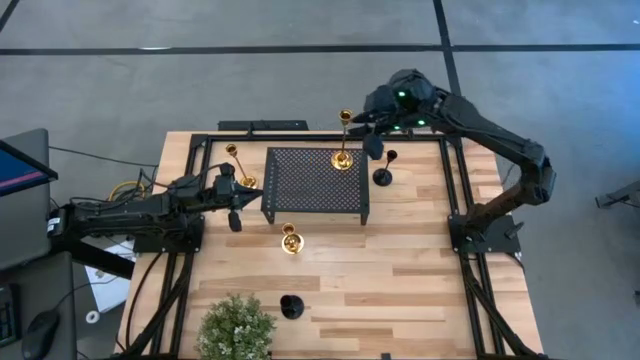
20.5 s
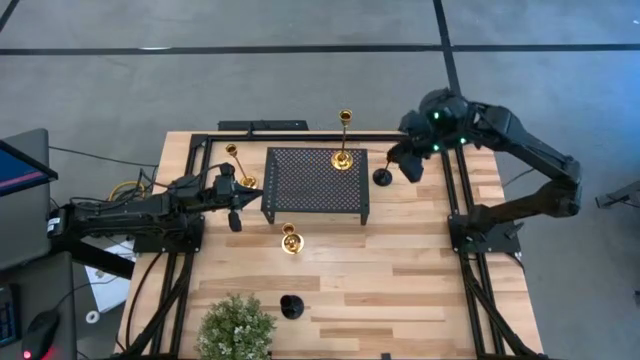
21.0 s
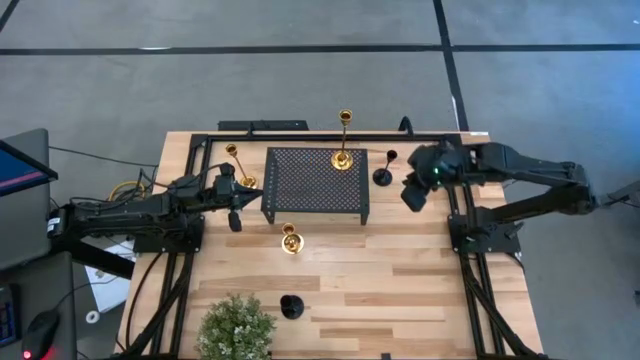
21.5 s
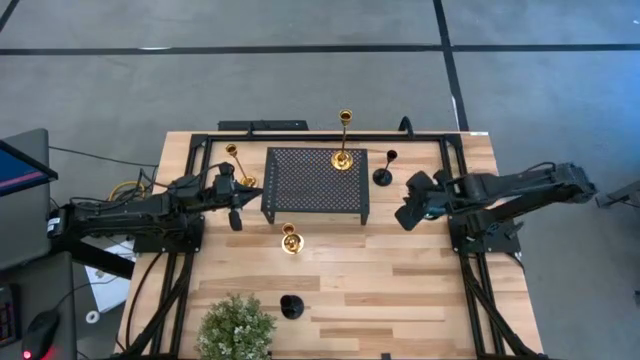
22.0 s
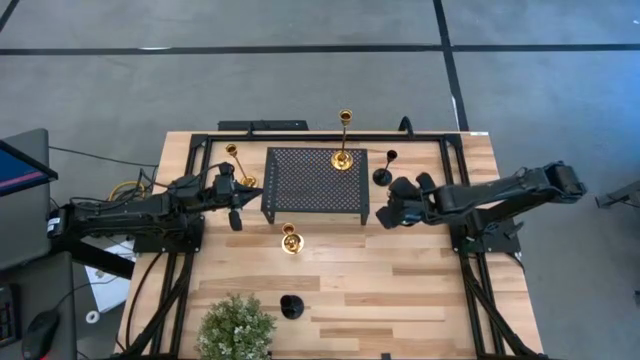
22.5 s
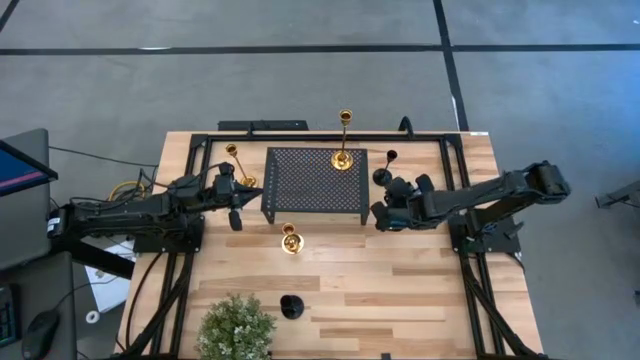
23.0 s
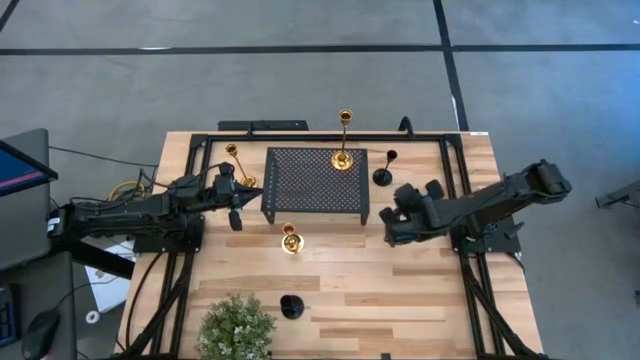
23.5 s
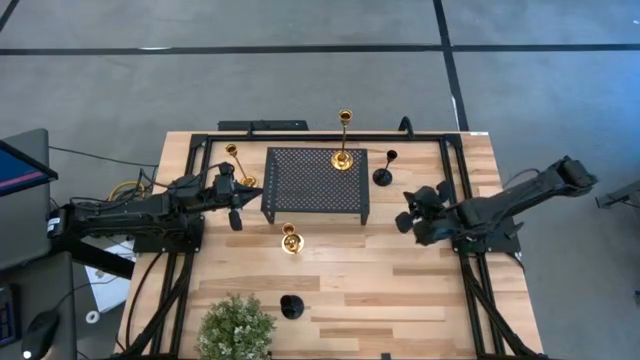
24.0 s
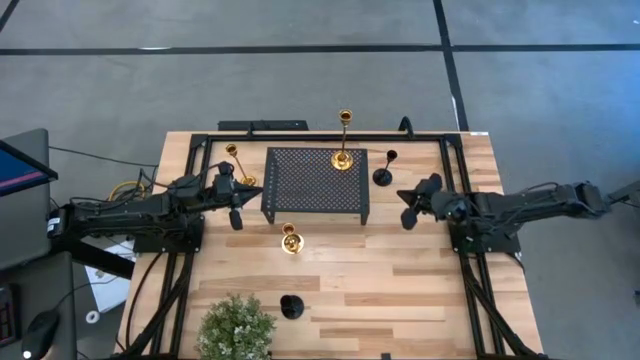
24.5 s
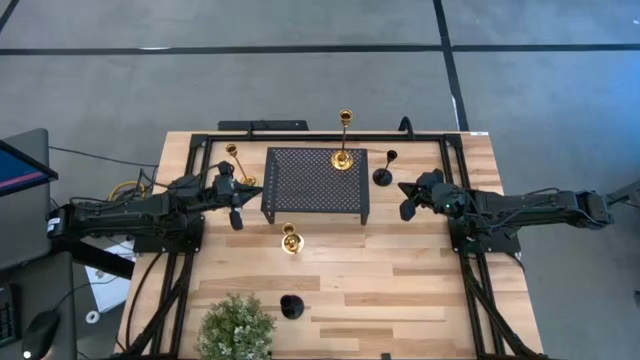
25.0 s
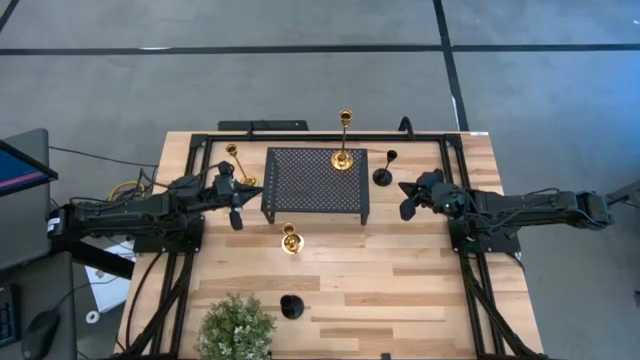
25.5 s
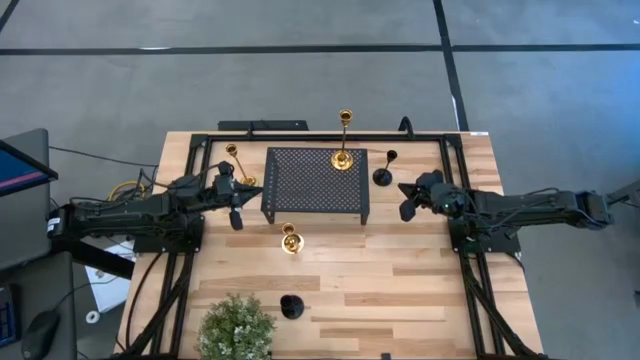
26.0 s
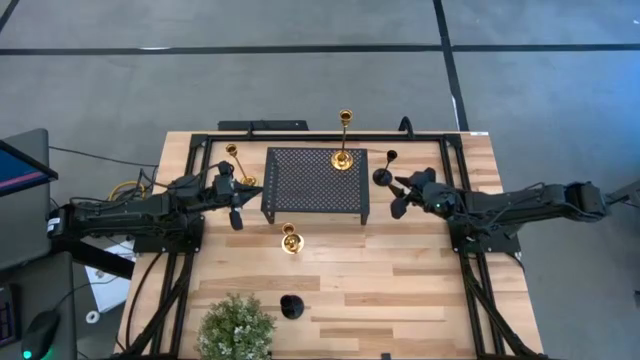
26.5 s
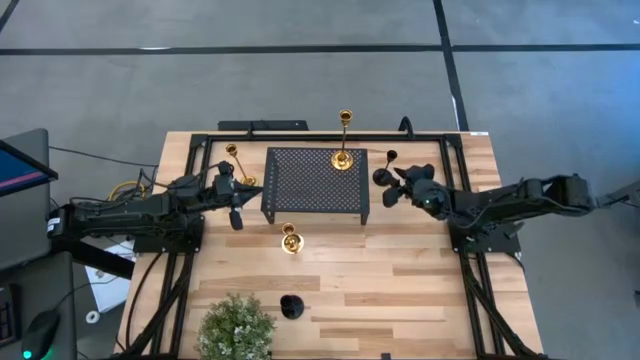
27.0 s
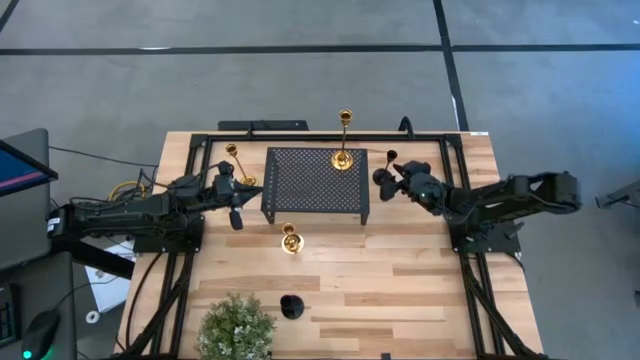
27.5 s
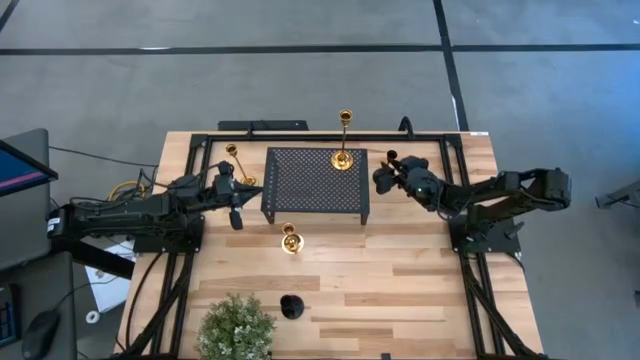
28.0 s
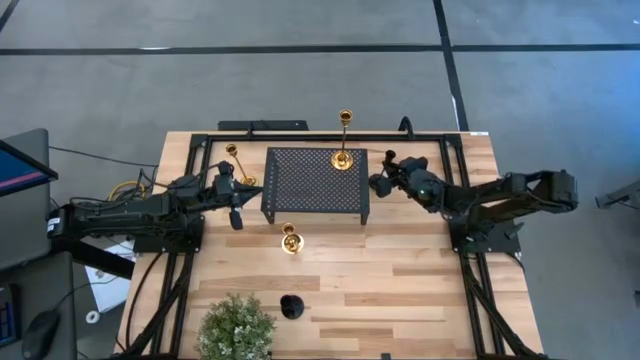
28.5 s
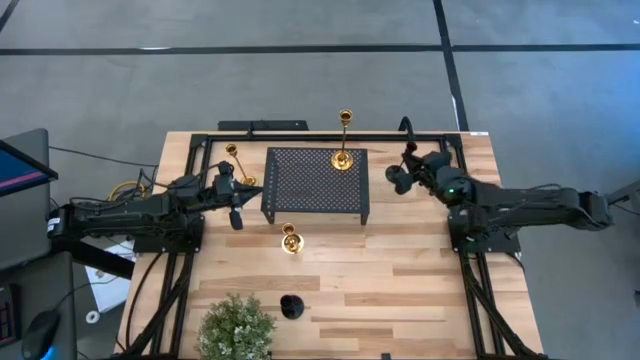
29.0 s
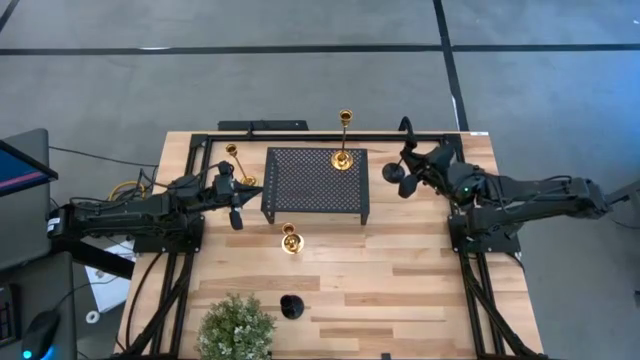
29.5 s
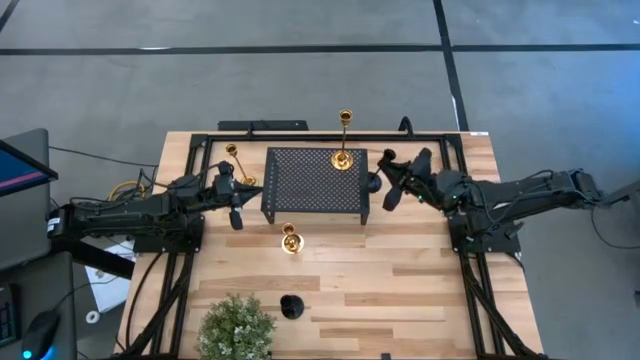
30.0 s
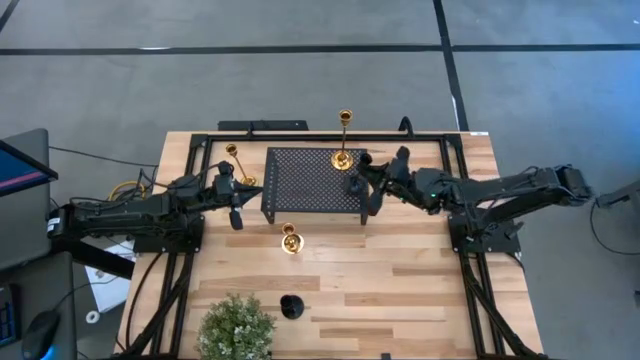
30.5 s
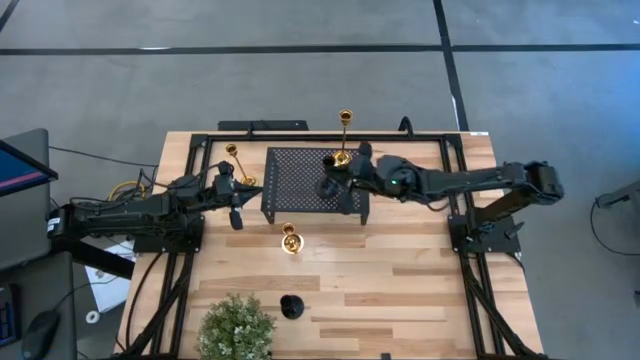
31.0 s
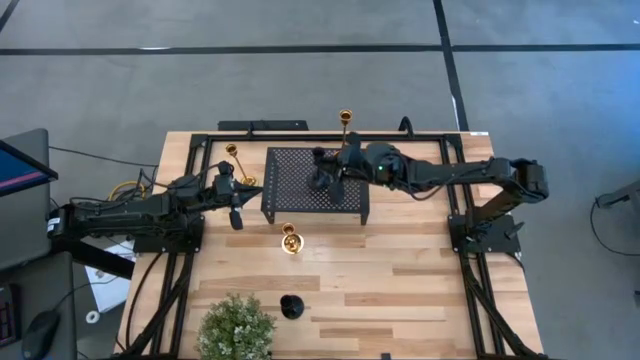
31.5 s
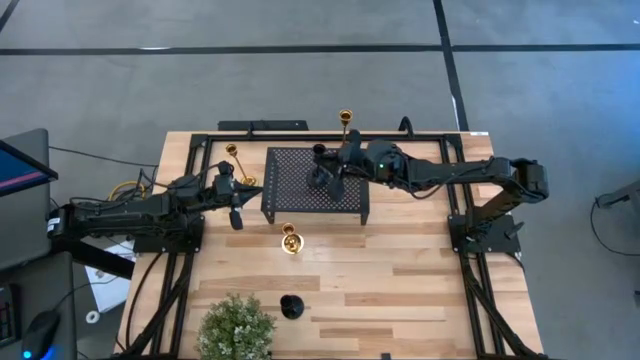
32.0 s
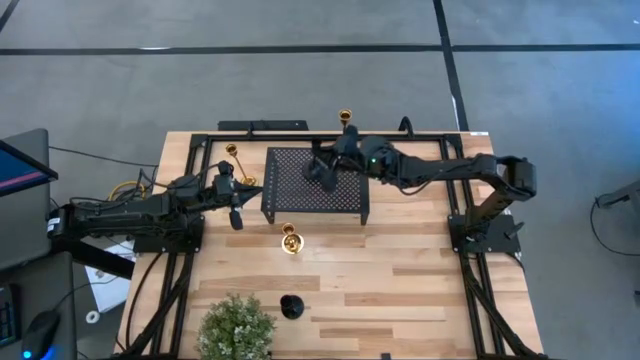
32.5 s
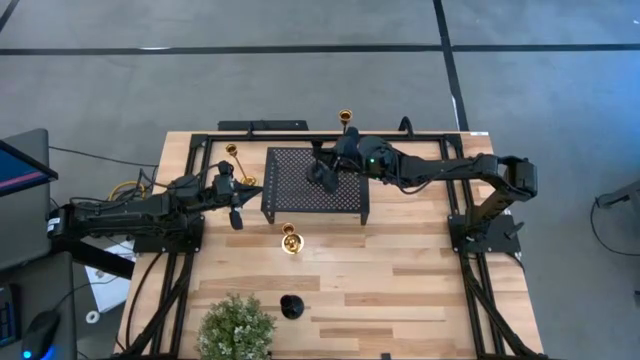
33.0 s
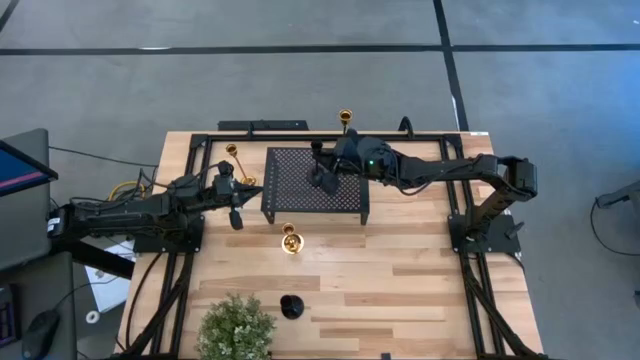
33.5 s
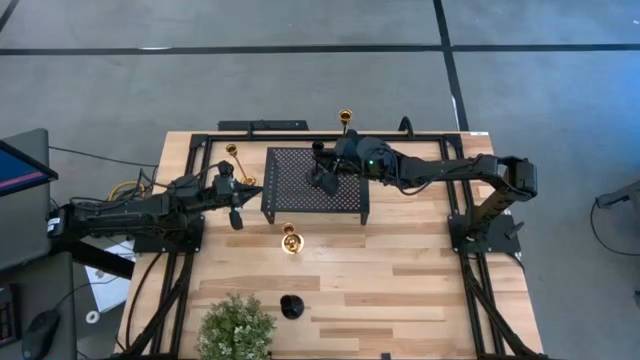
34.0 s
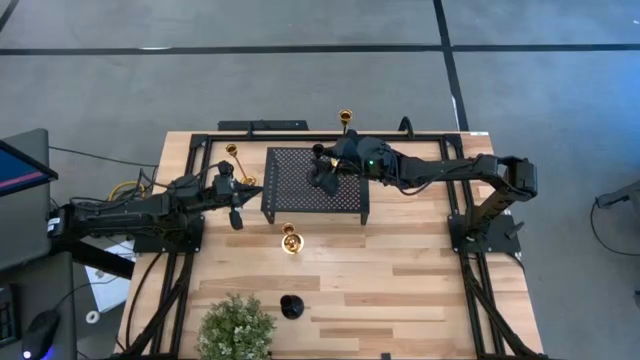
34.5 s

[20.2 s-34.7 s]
Task: Pick & Place candle stick holders
Put the top black candle holder on the shelf

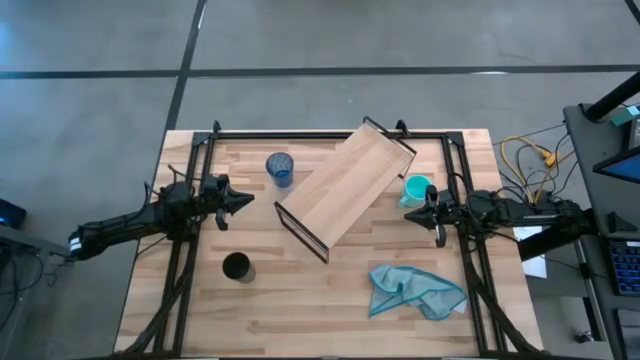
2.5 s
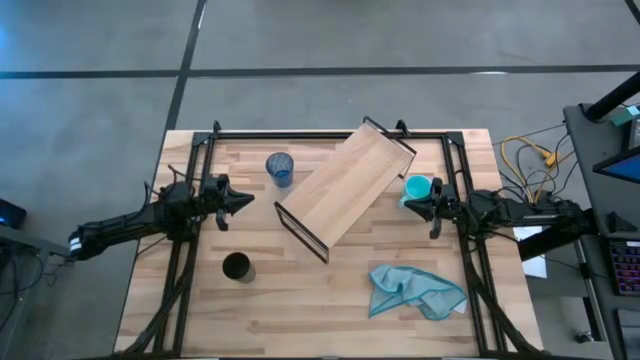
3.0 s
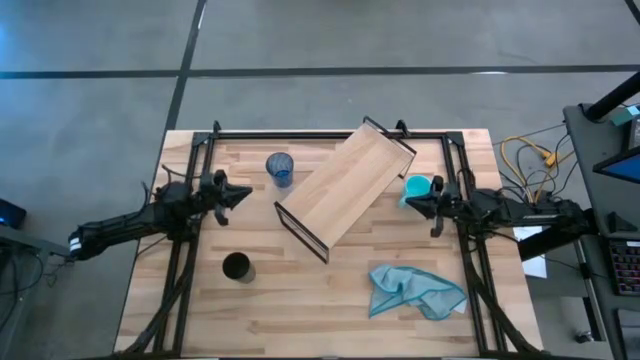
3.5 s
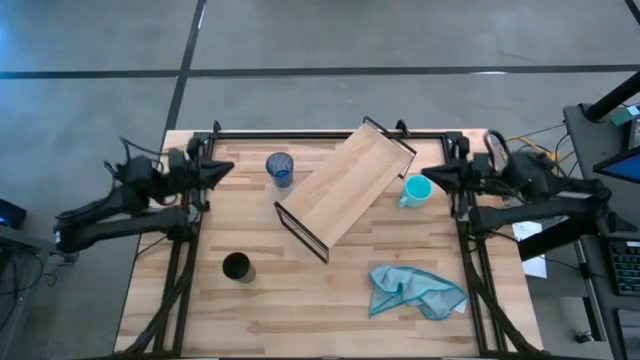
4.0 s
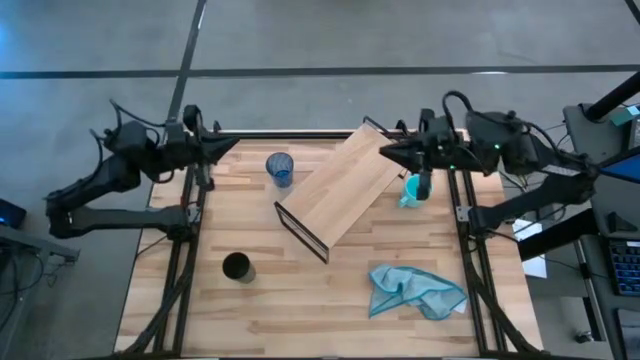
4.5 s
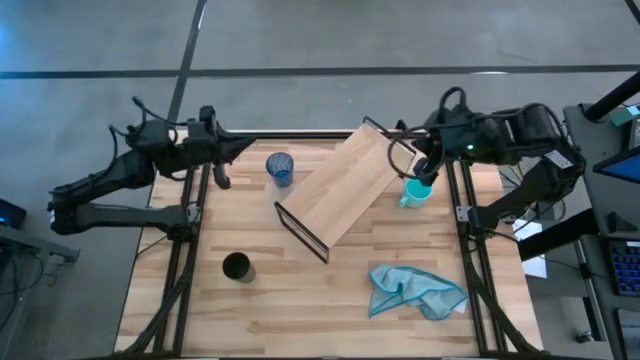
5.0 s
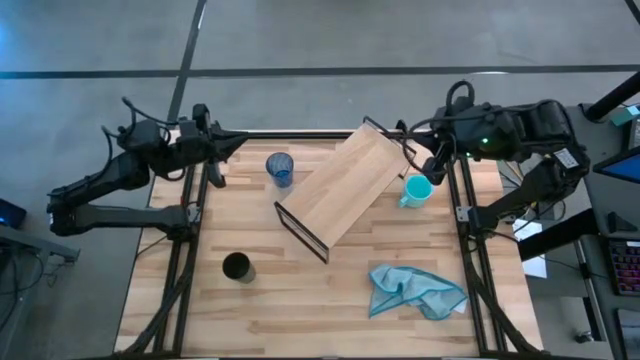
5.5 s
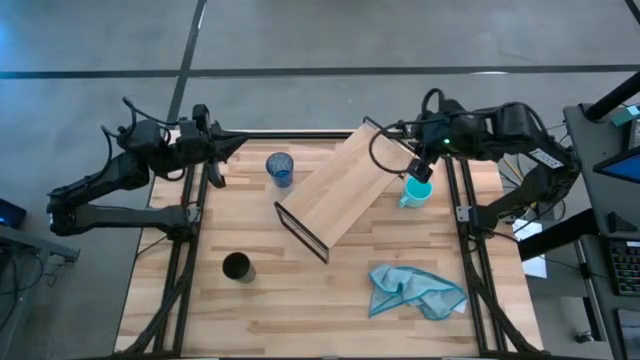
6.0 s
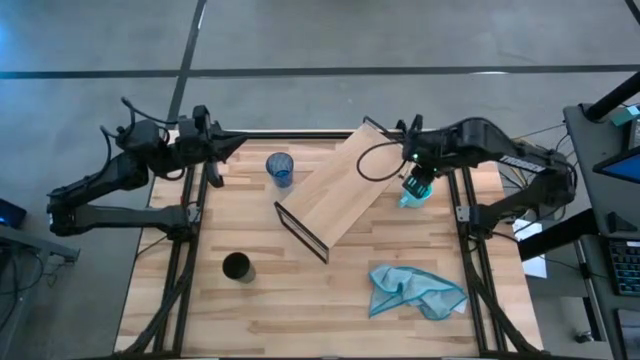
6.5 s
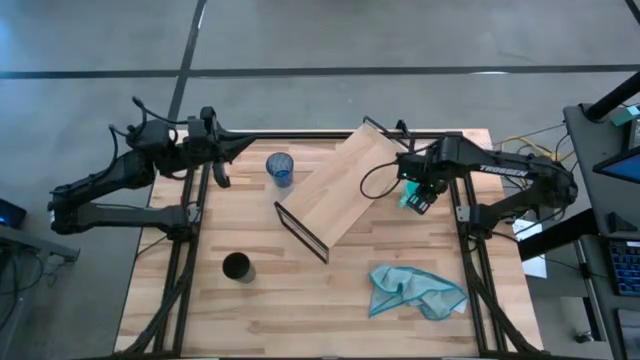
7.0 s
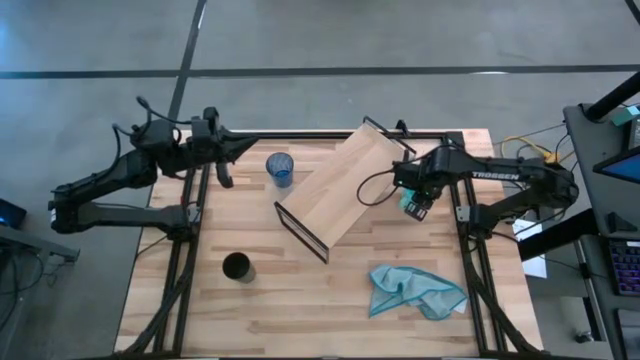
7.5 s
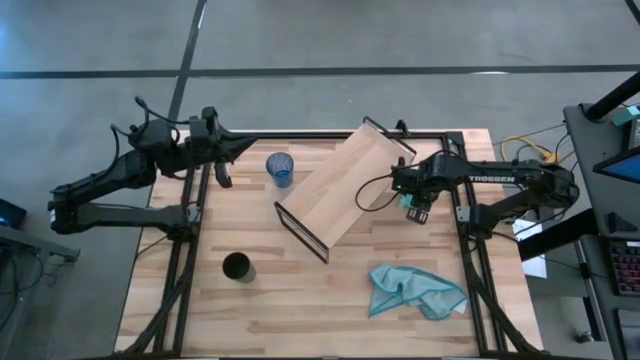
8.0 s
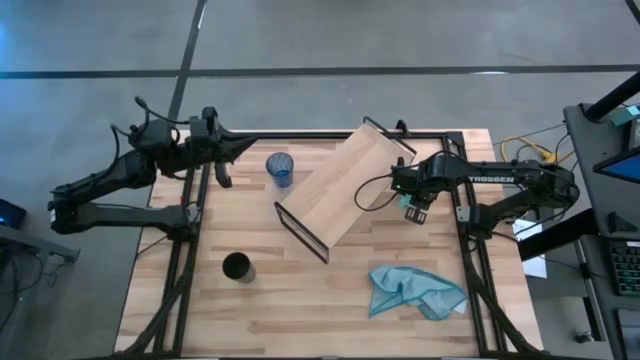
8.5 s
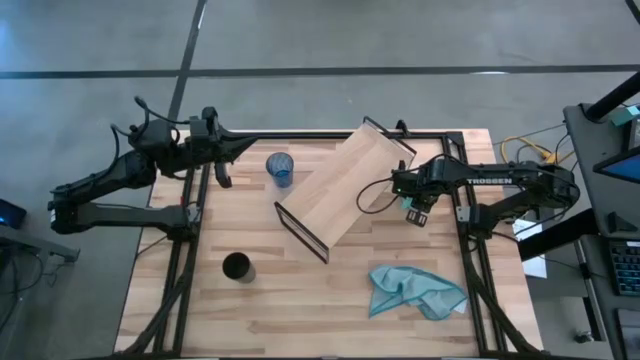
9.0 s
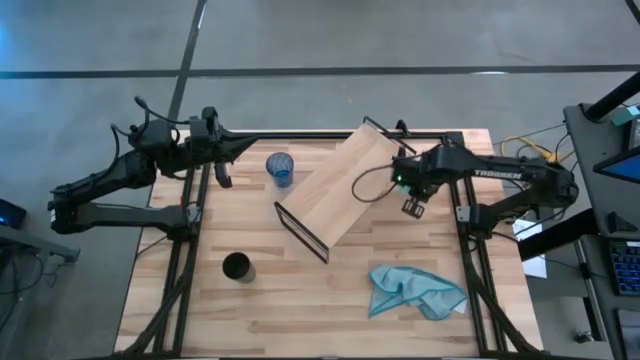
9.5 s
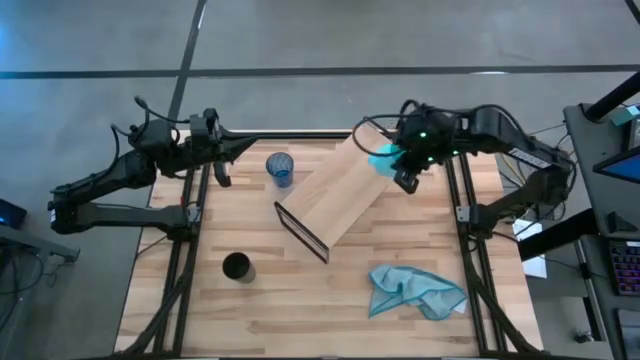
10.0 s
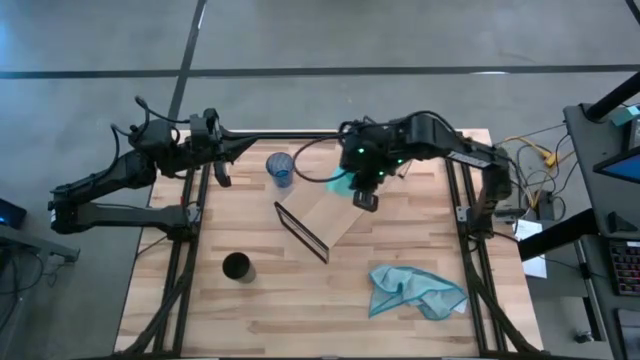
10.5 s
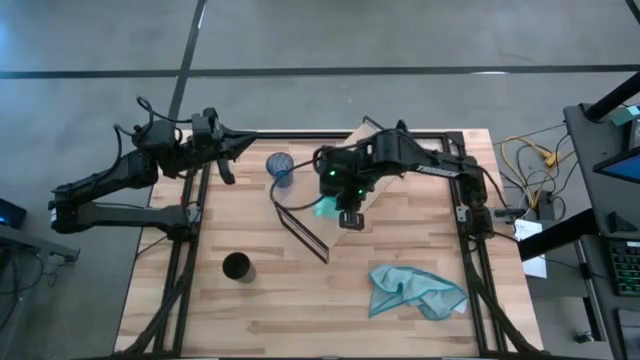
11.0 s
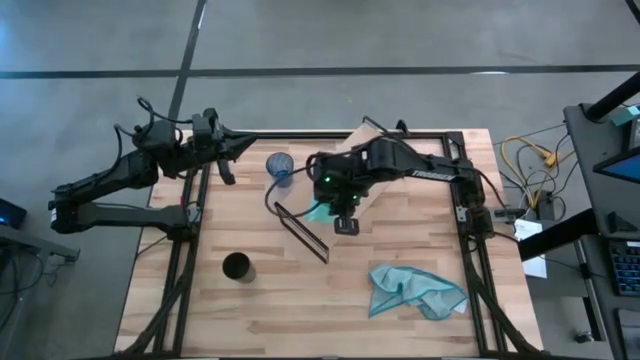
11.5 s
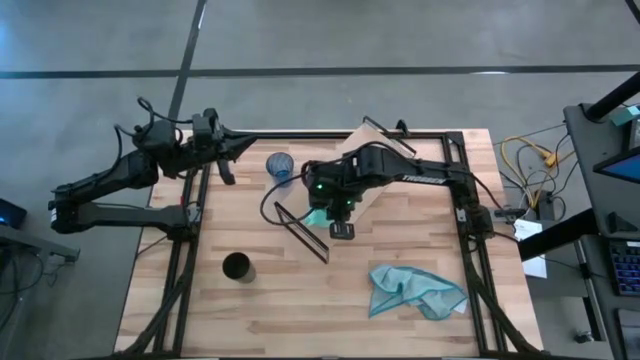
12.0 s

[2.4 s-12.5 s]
Task: Stack small to large cups/mugs on shelf
Put the light blue mug on the shelf
